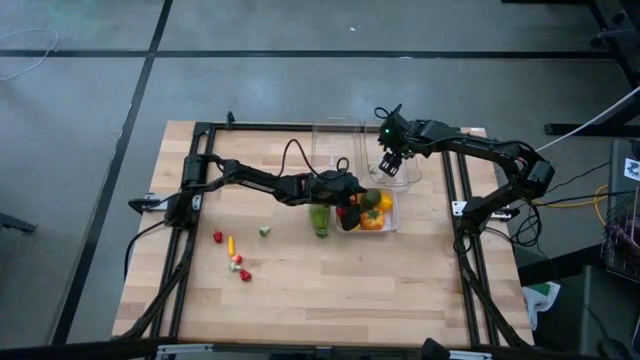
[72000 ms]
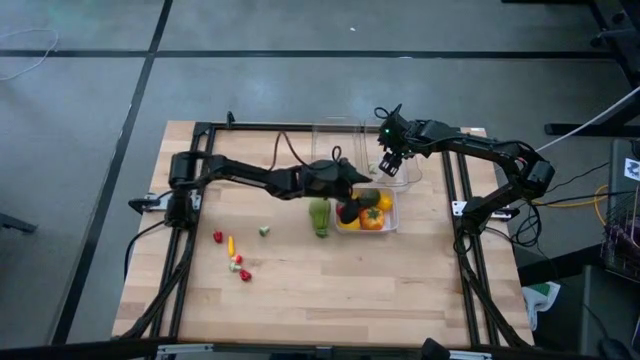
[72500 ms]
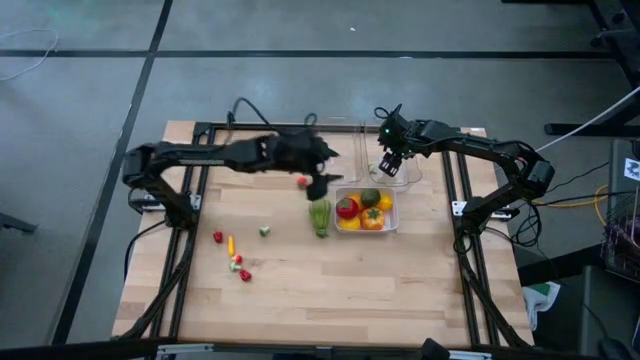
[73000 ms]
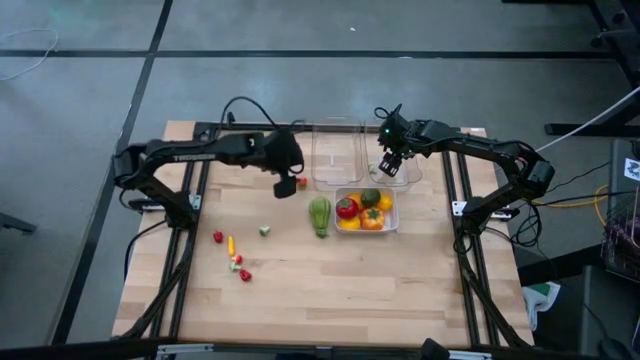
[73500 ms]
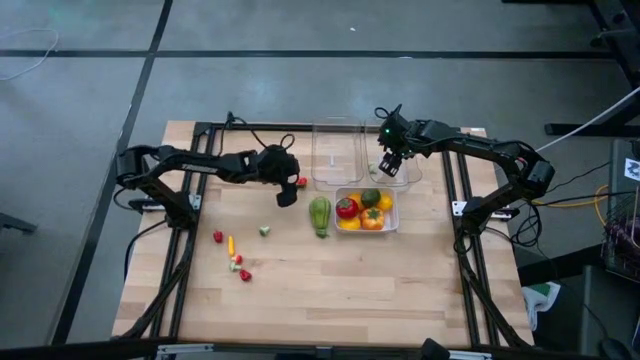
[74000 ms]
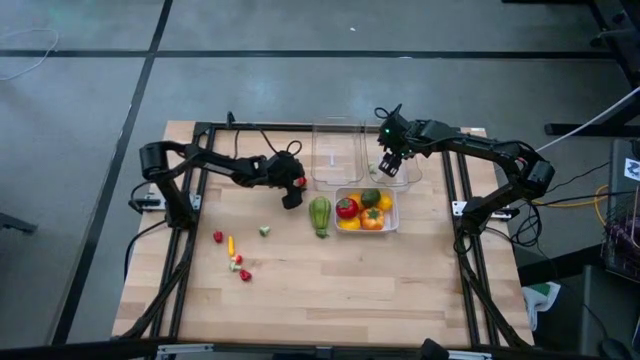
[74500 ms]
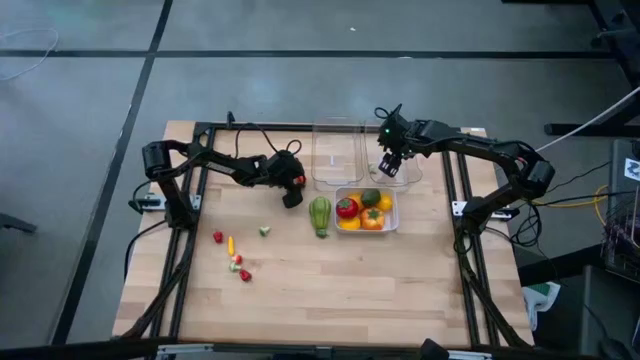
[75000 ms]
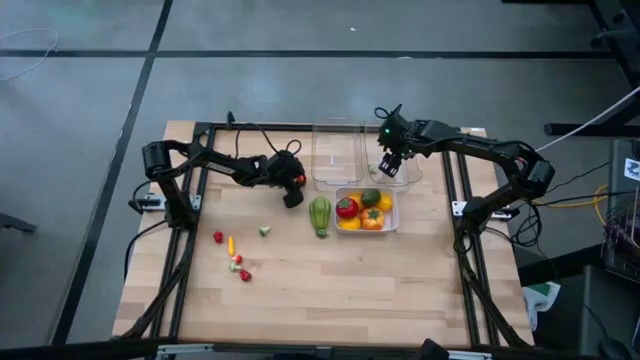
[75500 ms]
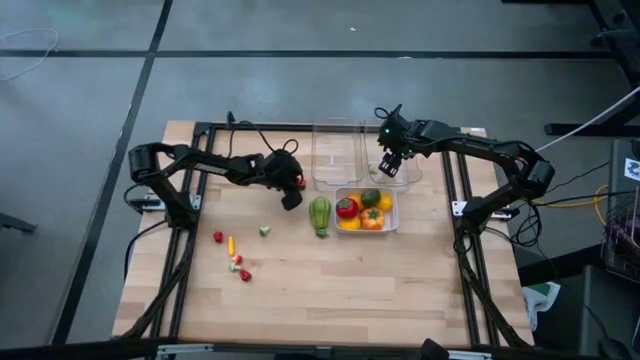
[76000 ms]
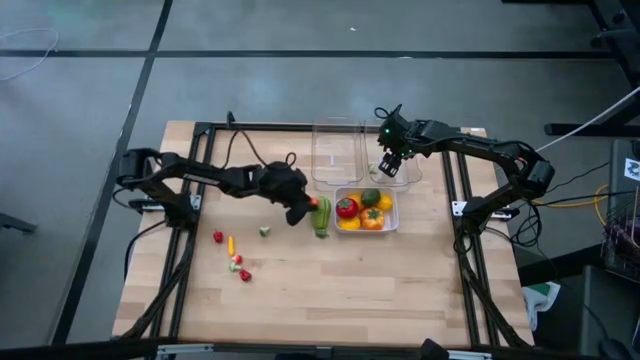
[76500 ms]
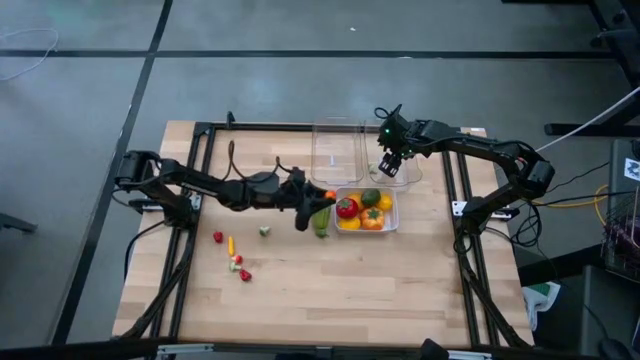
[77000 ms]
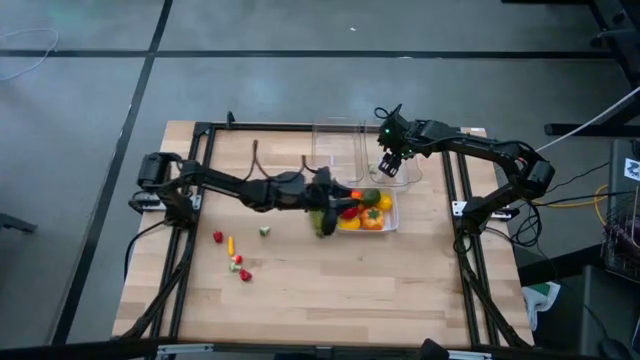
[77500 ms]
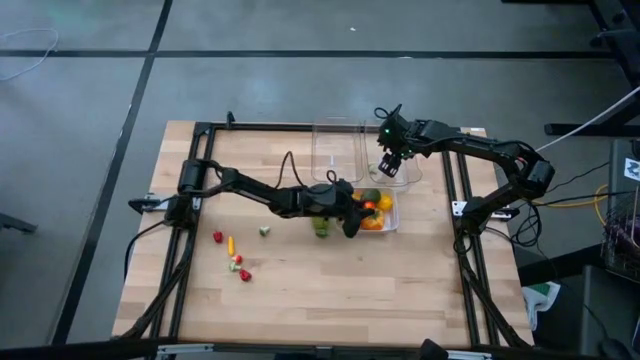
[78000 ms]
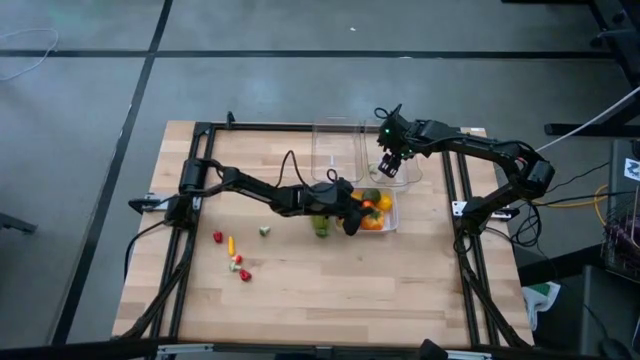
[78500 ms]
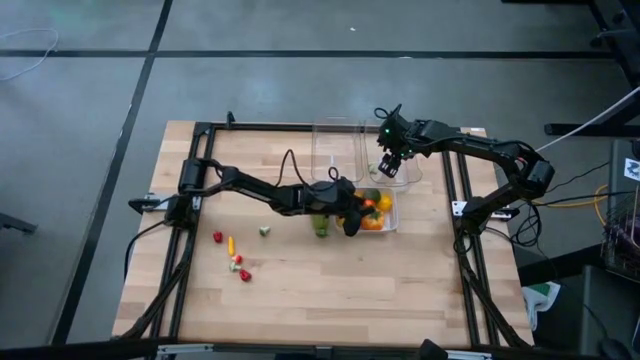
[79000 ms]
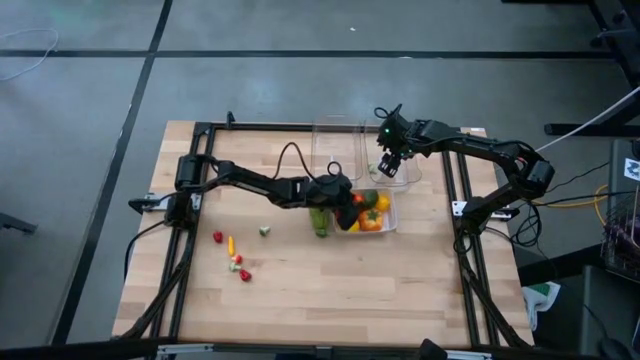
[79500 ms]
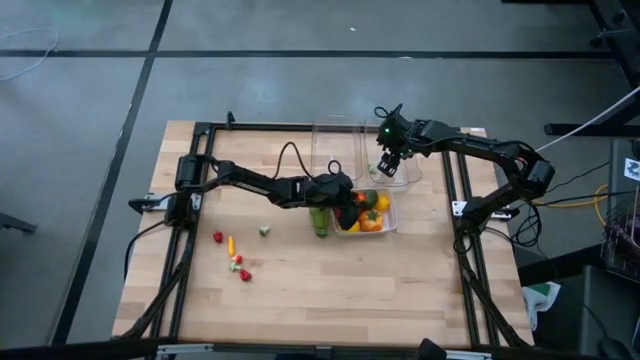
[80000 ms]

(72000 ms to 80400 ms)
Task: Sort produce into baskets
Put the small persimmon into the white bin

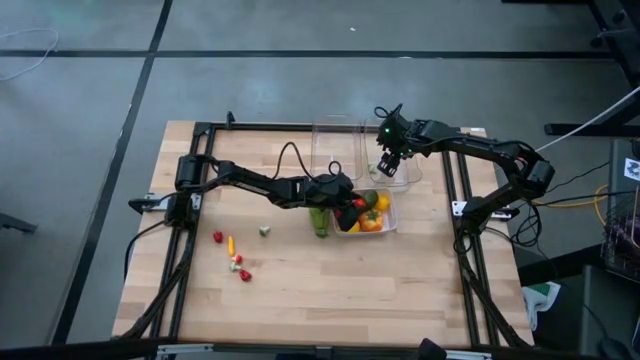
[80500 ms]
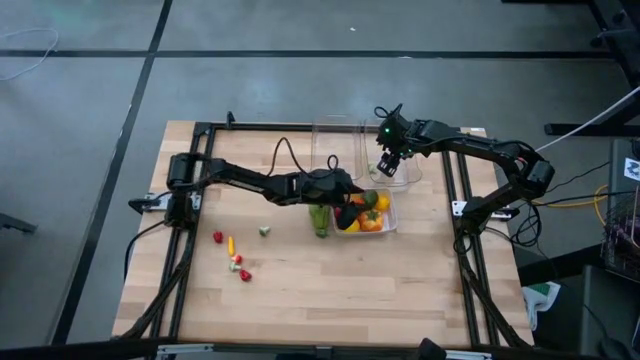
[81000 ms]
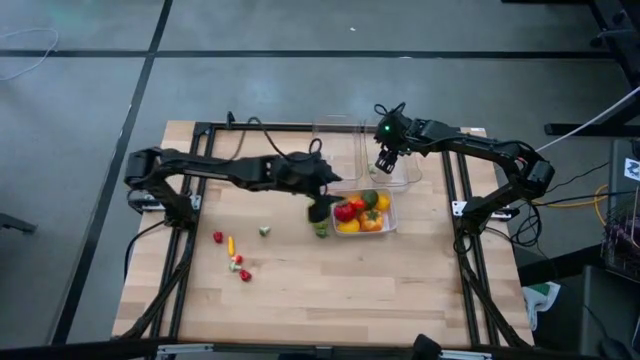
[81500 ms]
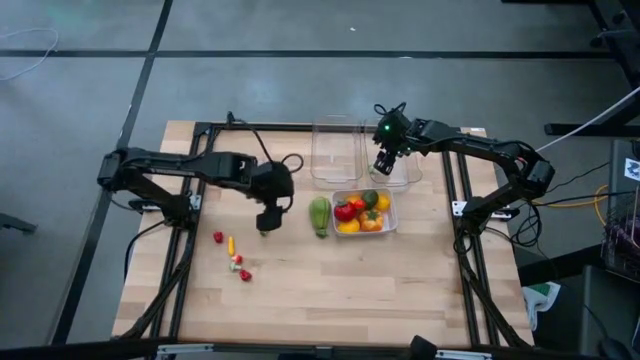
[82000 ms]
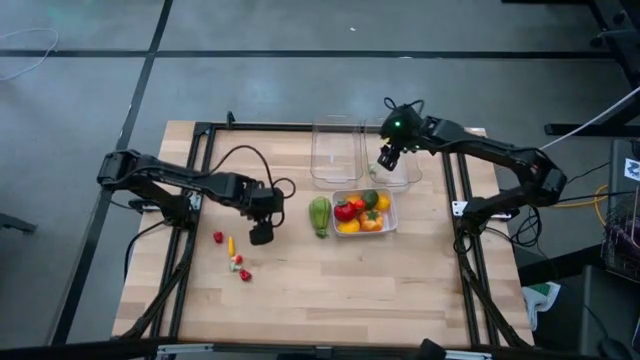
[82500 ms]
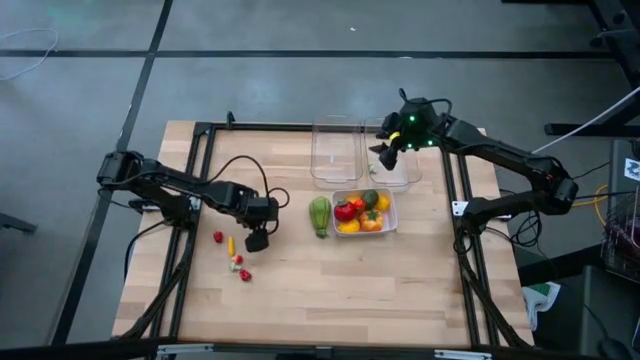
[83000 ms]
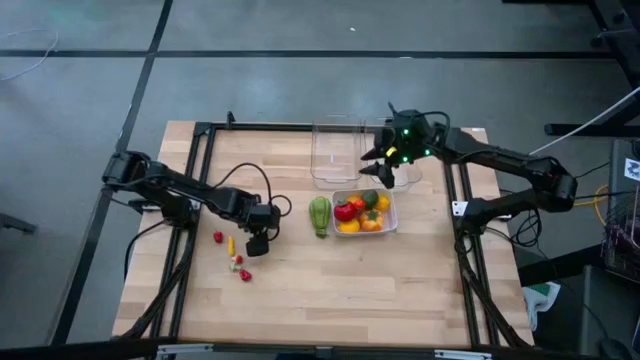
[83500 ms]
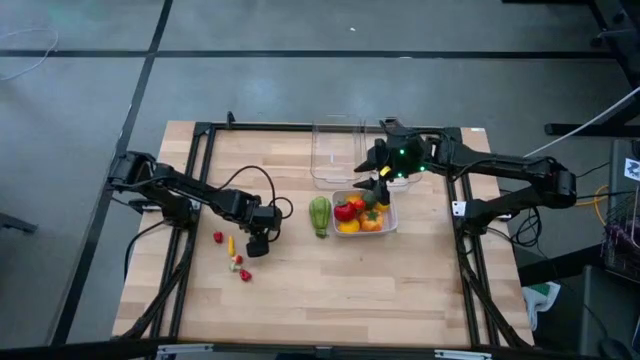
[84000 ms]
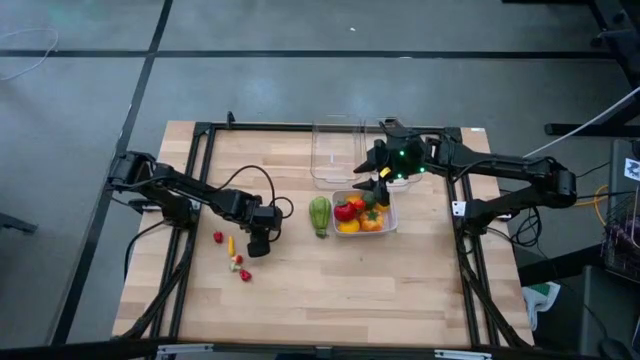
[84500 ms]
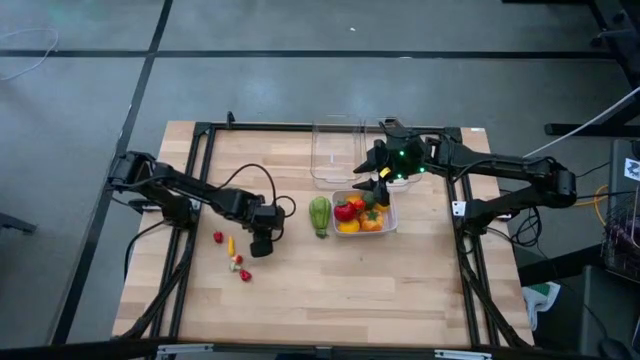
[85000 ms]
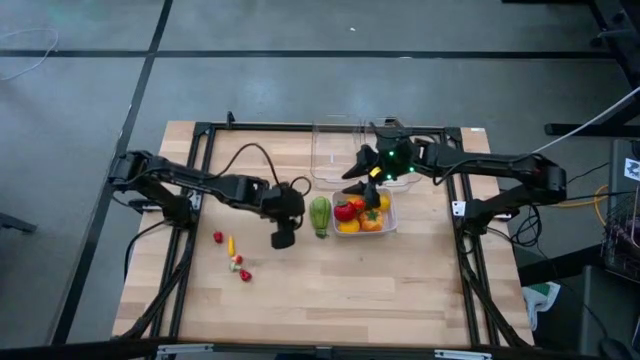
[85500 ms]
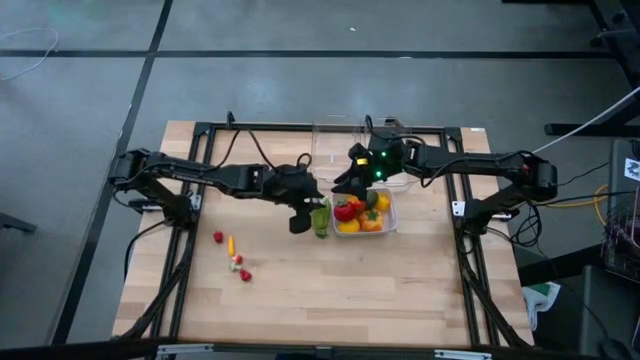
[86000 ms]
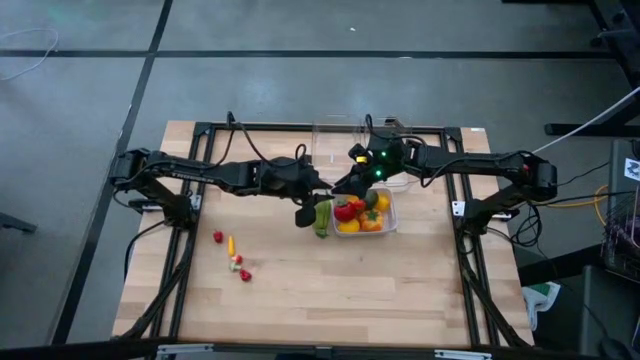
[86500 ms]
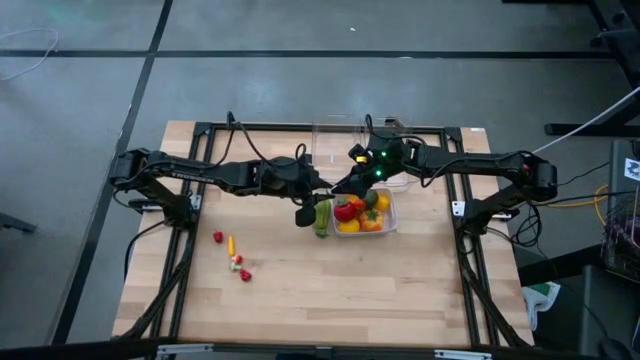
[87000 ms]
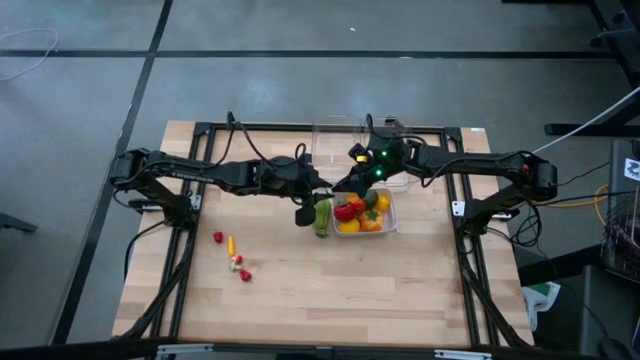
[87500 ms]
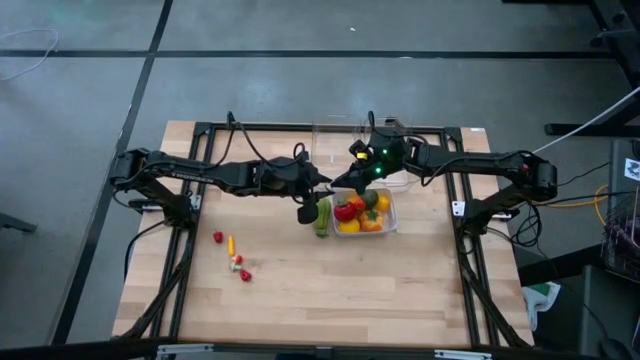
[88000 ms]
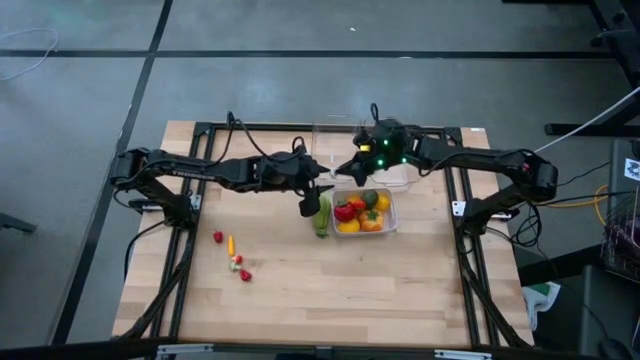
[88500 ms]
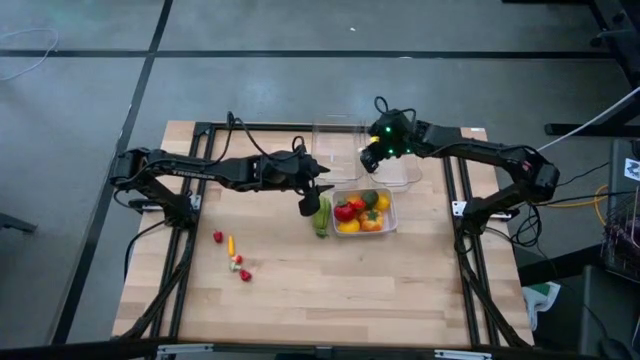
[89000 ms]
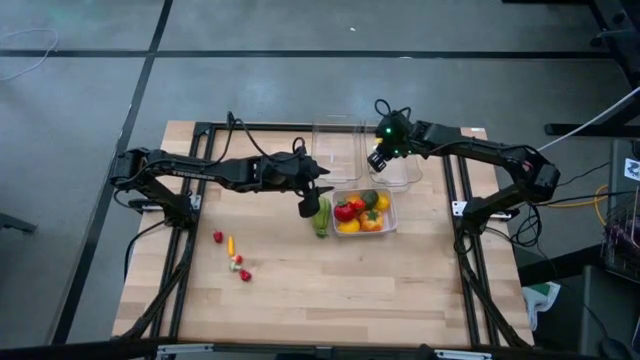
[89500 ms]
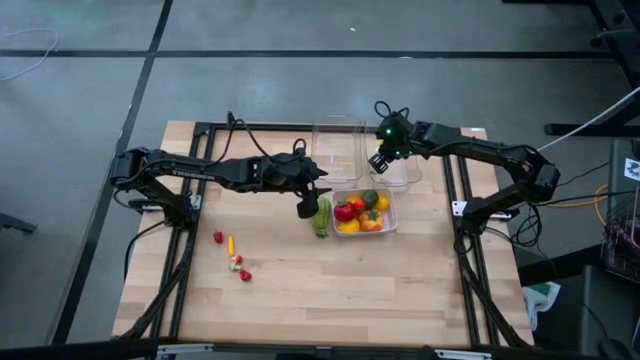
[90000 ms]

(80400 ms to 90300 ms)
Put the top green mushroom into the right transparent bin

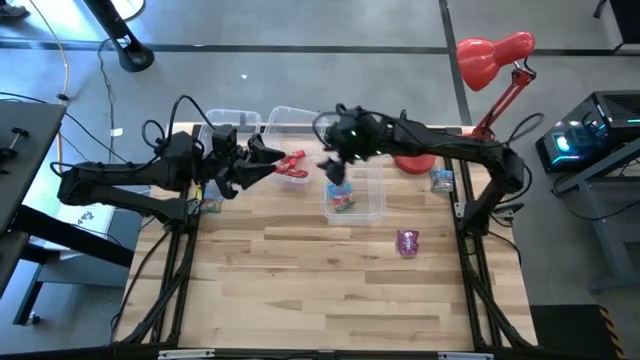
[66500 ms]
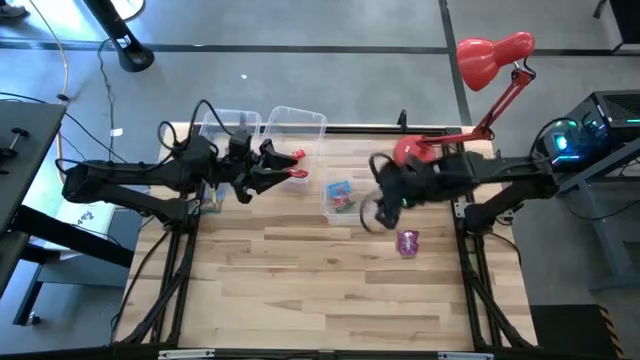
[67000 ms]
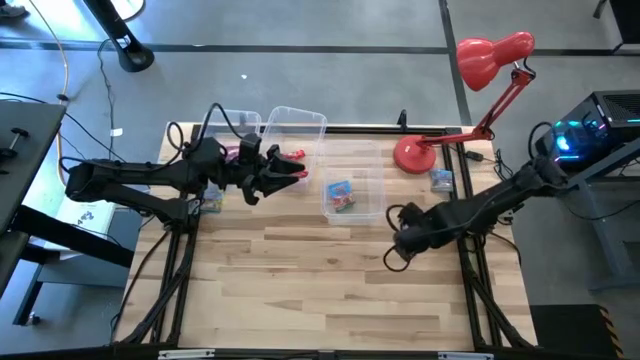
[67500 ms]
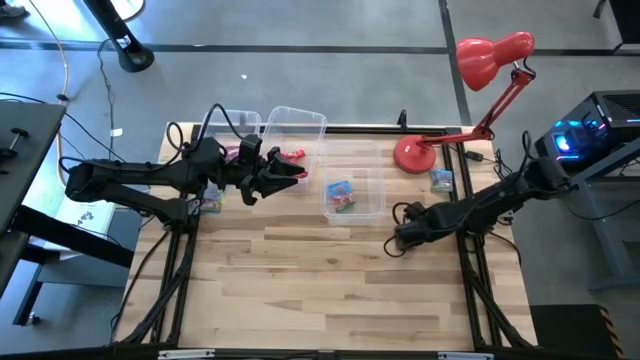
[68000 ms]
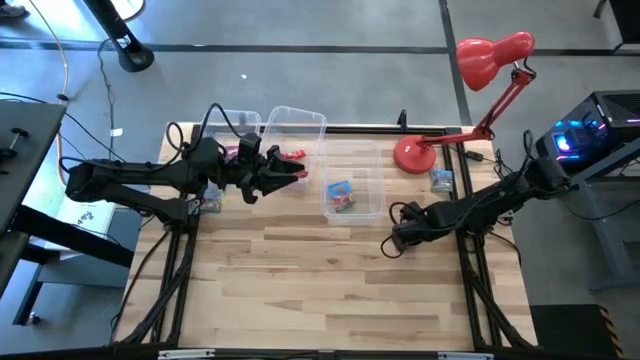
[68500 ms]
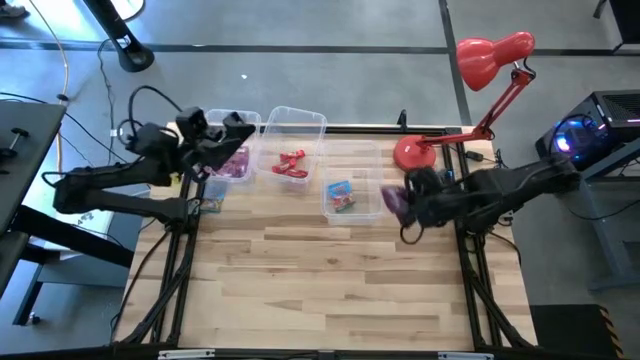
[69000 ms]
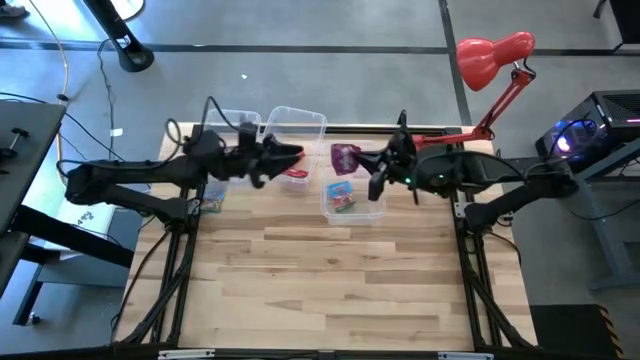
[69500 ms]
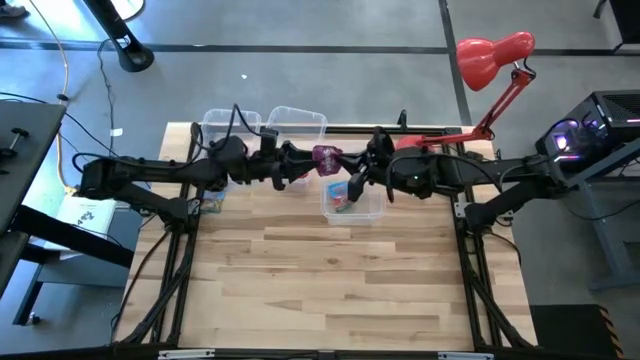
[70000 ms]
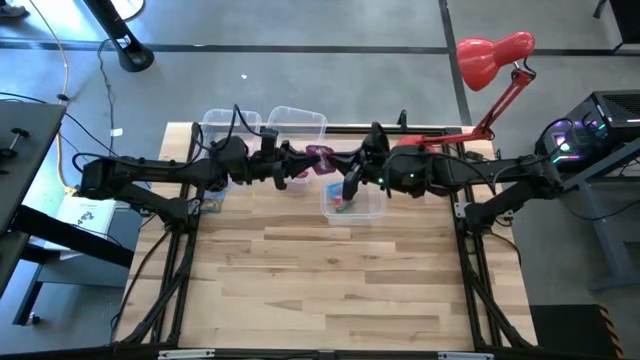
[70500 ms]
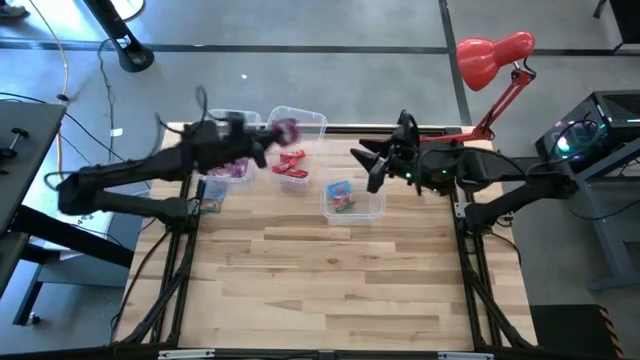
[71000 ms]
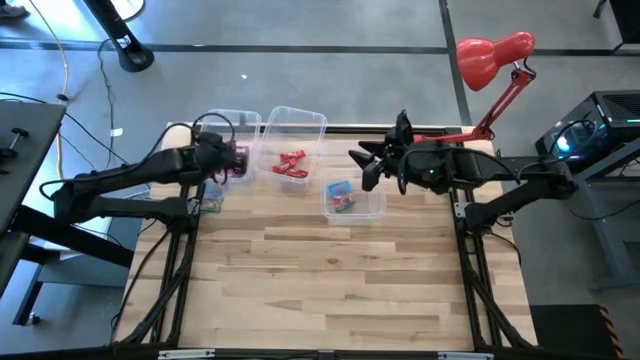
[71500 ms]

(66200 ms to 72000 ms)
Task: Sort candy
Put the violet candy bag into the left transparent bin
